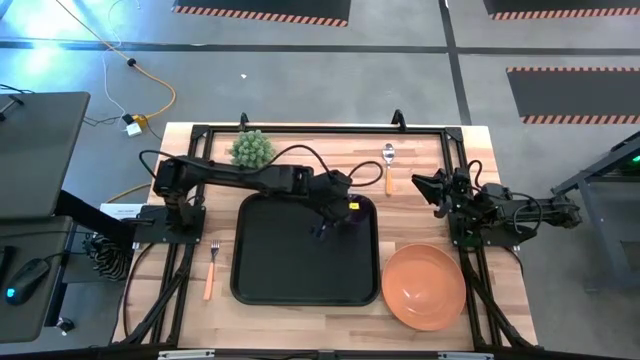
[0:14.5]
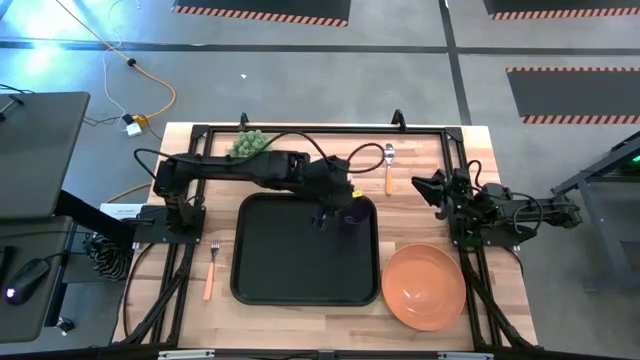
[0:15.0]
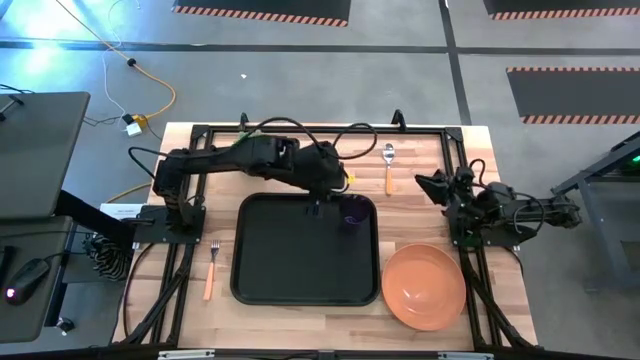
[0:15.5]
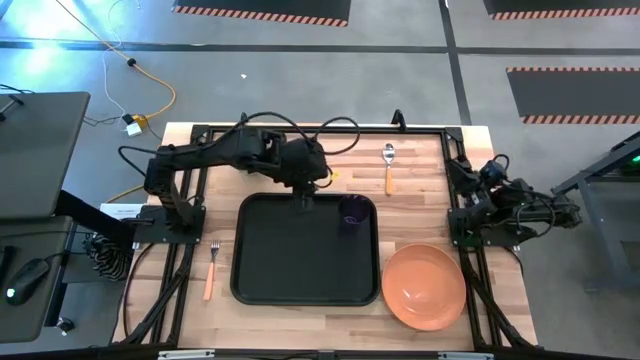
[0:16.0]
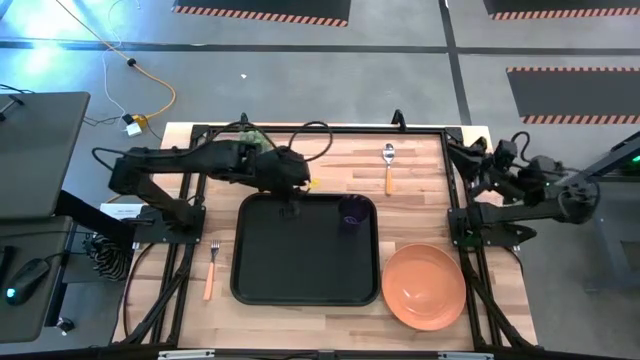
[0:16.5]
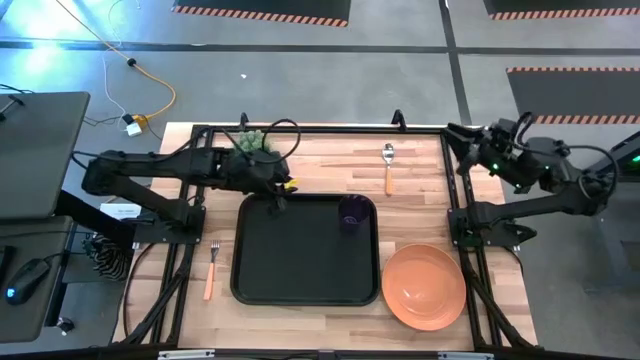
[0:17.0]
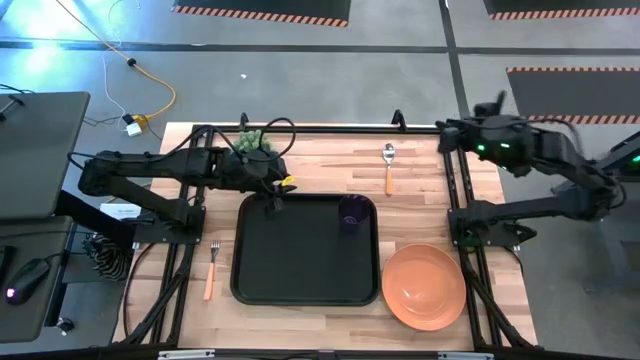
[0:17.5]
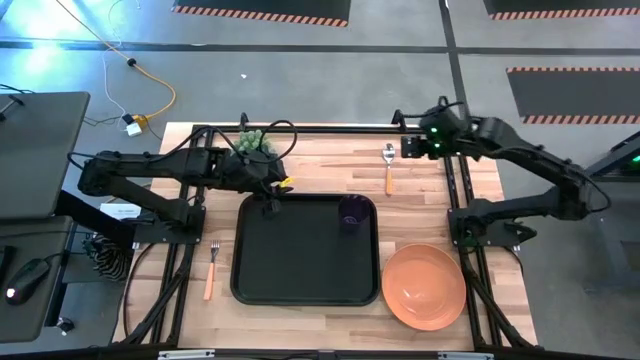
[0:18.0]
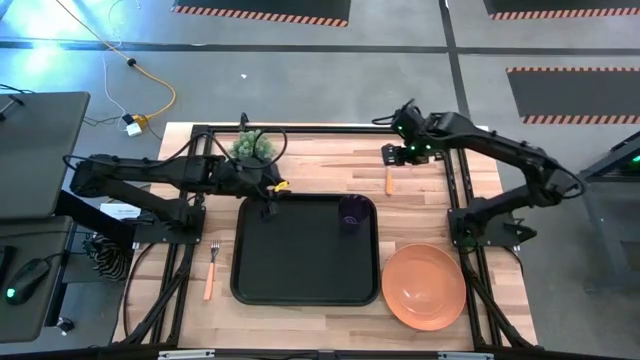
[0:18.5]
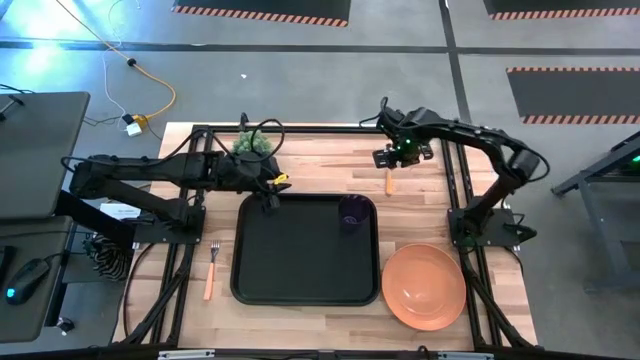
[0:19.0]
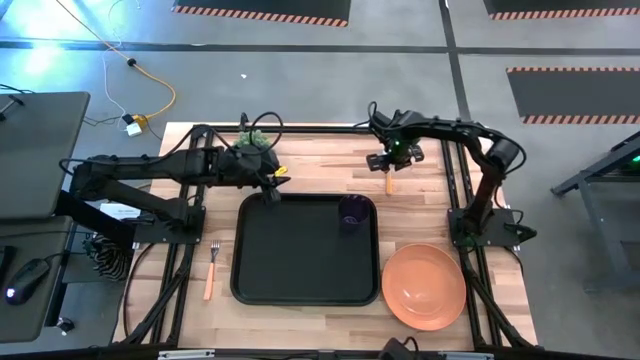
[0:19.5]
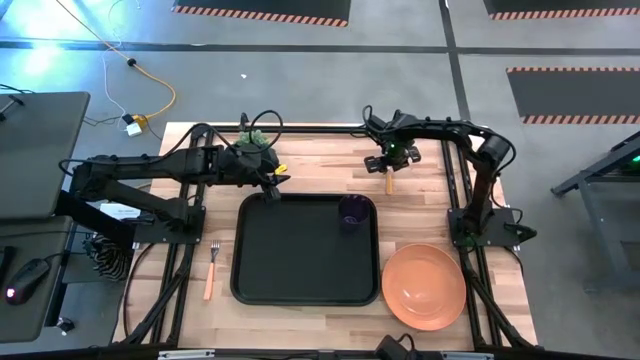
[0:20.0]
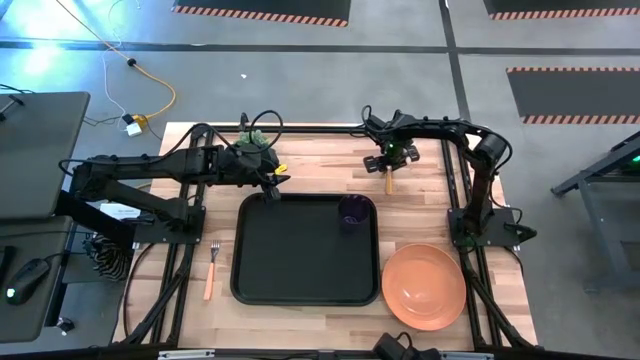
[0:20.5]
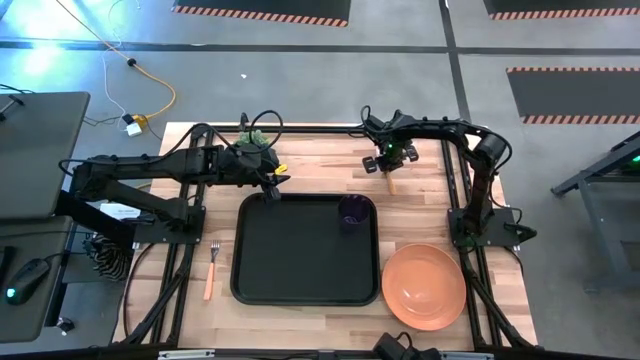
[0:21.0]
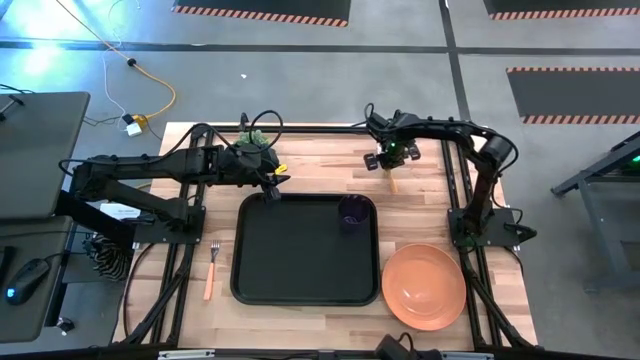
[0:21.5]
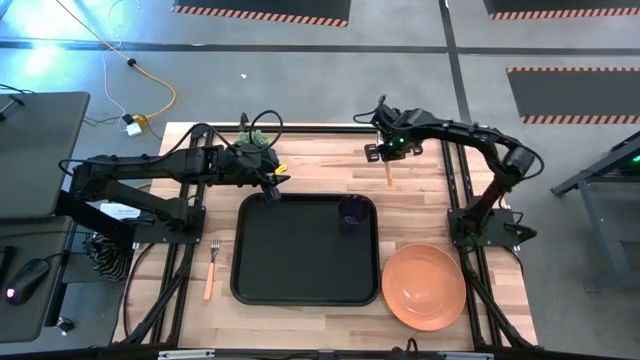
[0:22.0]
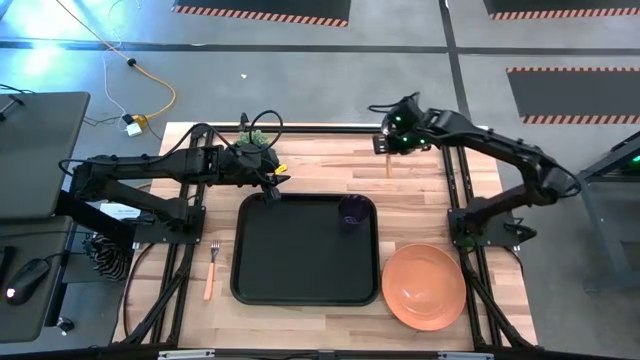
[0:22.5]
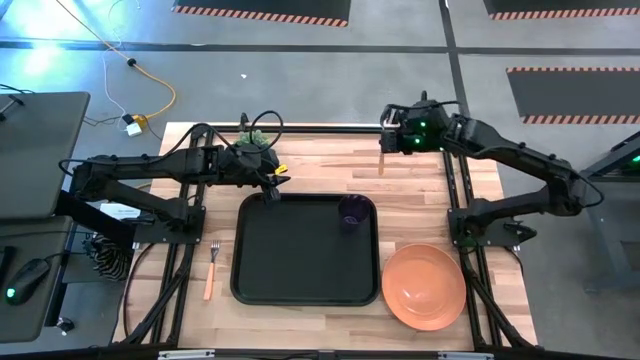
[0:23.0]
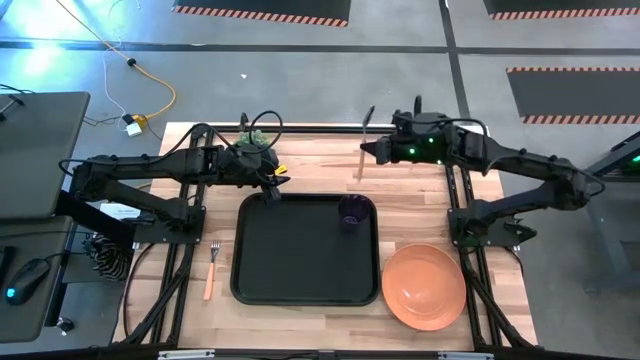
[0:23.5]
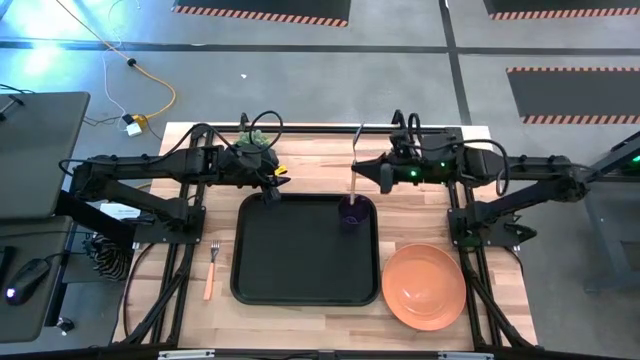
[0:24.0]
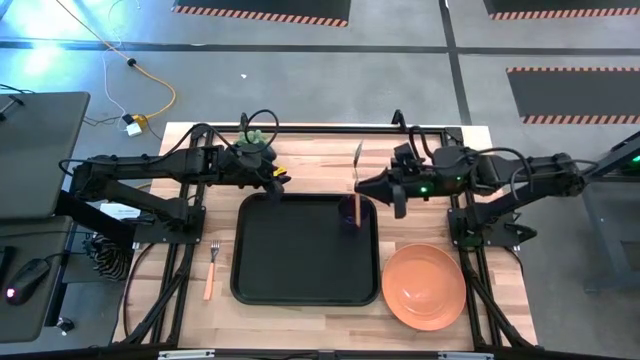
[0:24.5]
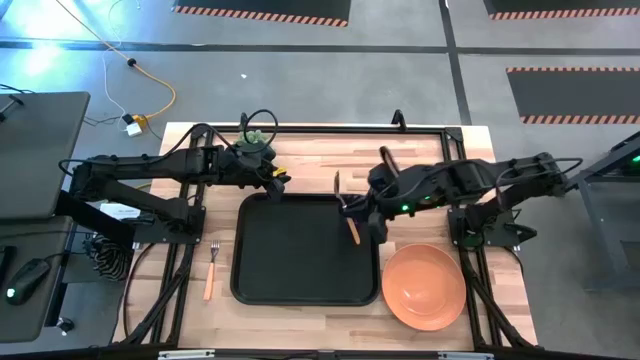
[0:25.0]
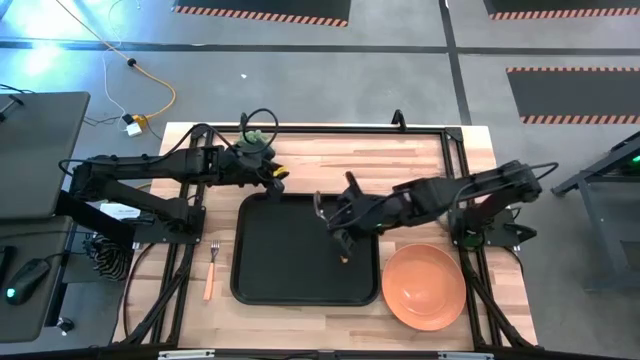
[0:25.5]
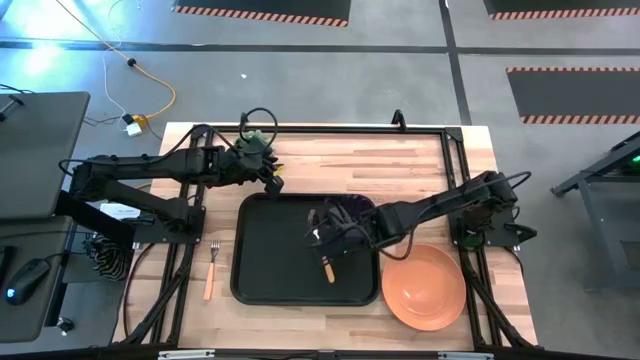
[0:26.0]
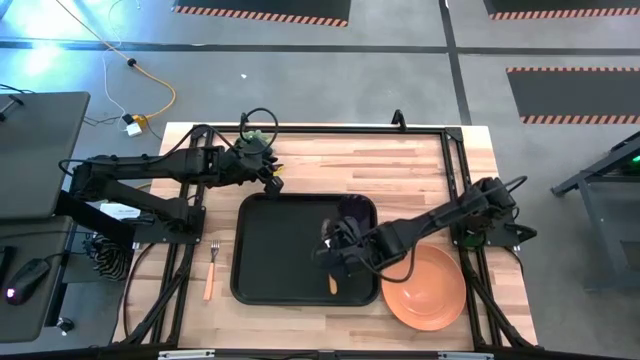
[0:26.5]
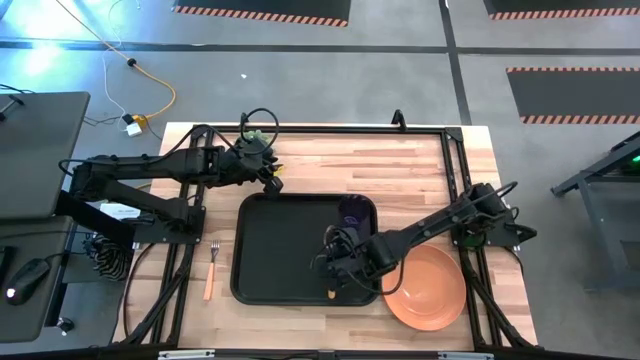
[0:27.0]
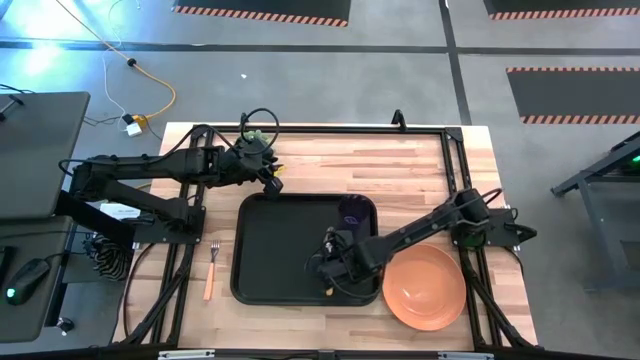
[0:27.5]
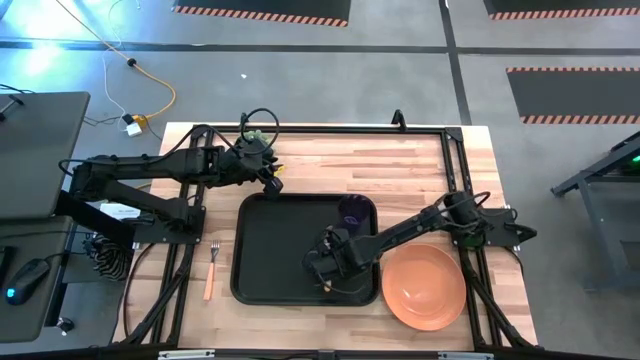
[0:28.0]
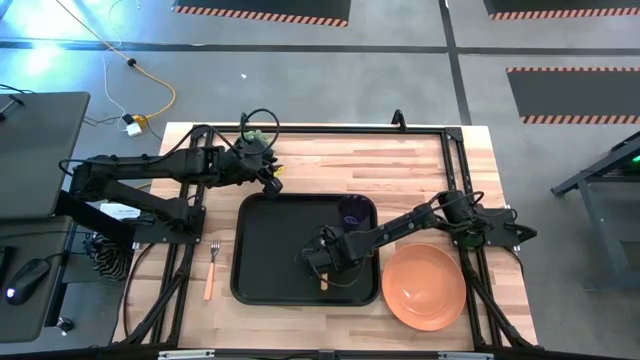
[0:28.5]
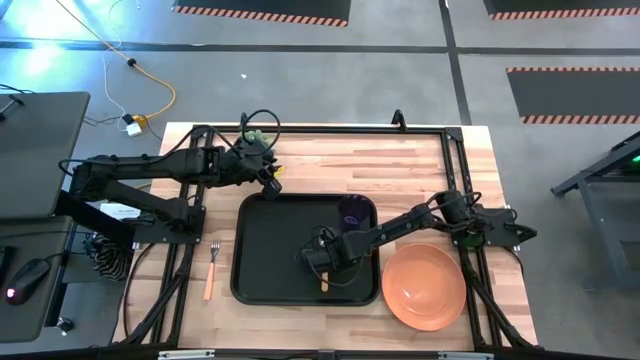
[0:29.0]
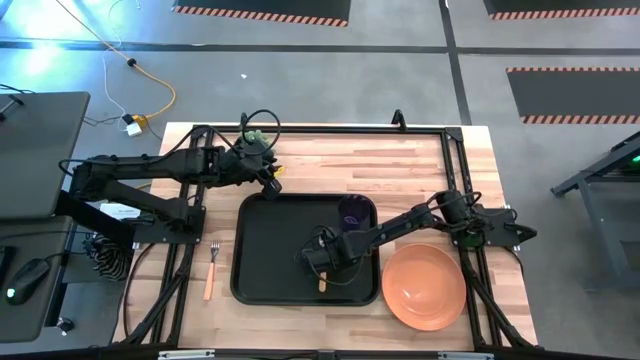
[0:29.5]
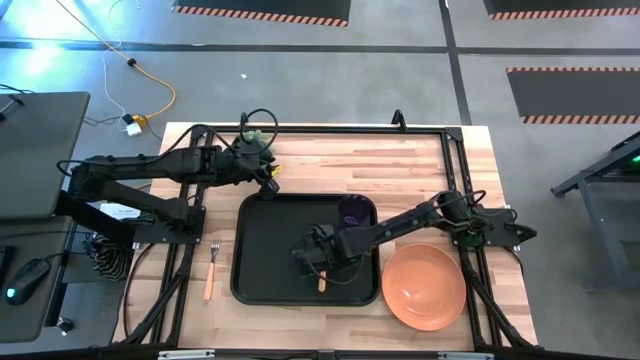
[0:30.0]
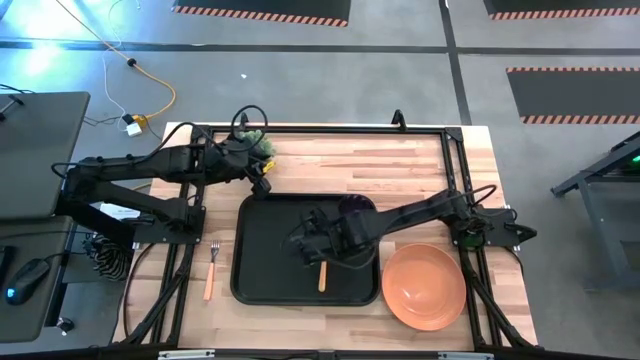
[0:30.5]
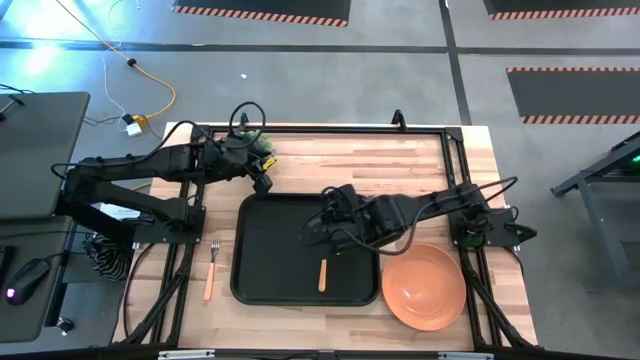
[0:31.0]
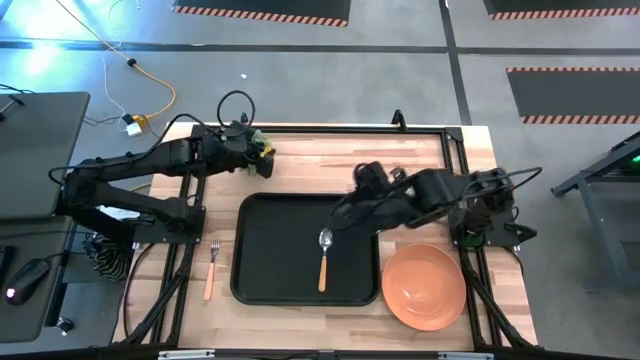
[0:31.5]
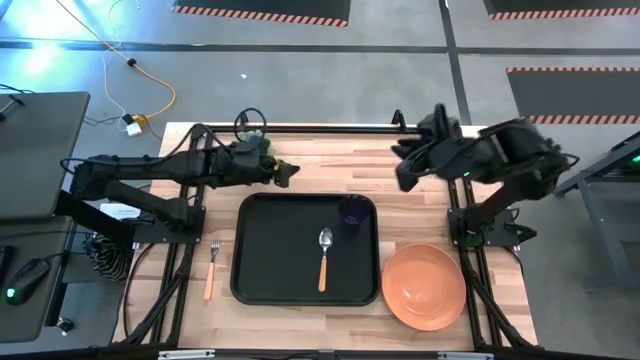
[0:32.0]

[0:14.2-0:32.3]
Task: Pick and place plate/cup/fork/spoon on tray
Put the orange yellow on the left side of the black tray

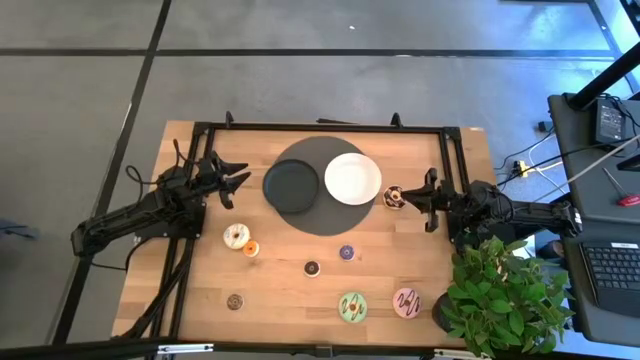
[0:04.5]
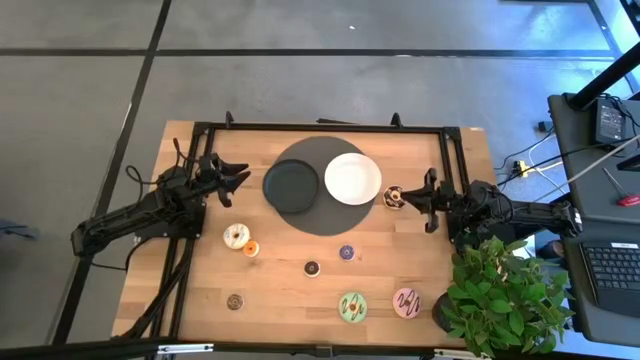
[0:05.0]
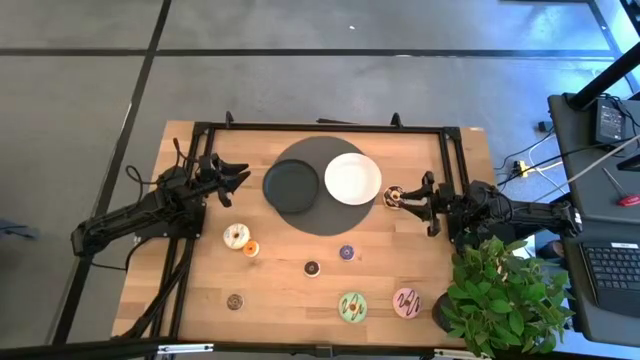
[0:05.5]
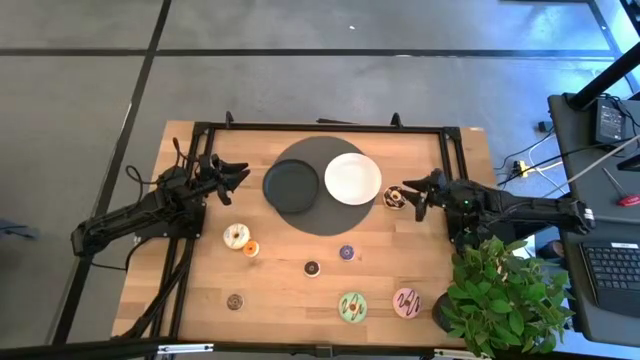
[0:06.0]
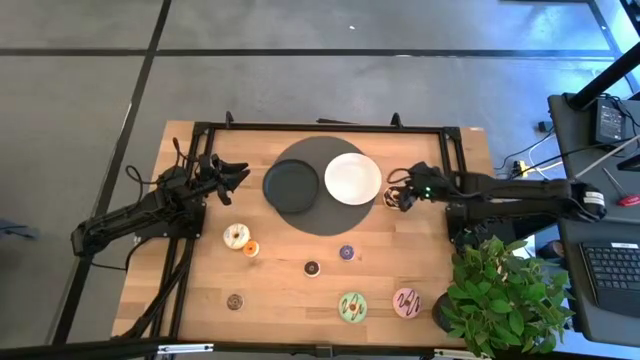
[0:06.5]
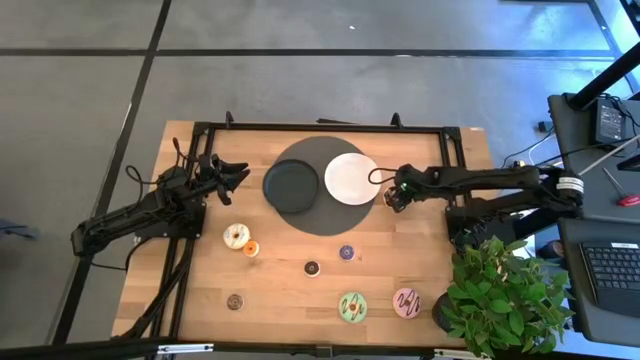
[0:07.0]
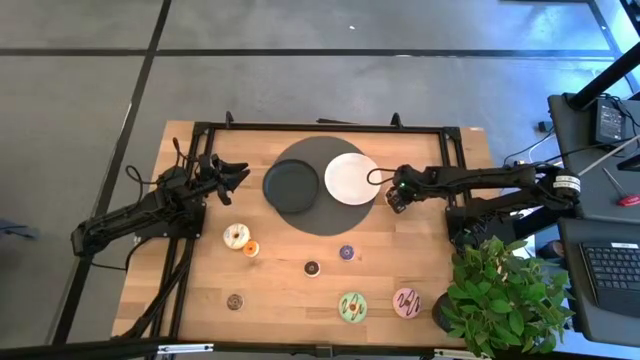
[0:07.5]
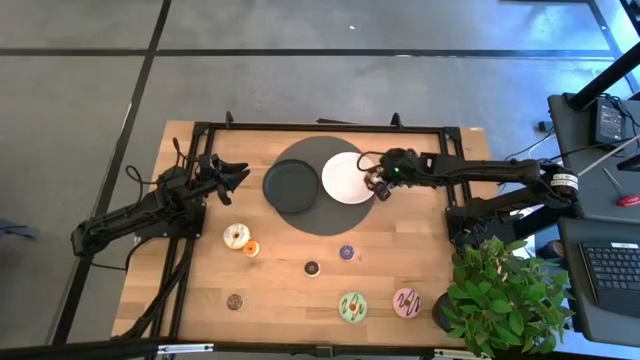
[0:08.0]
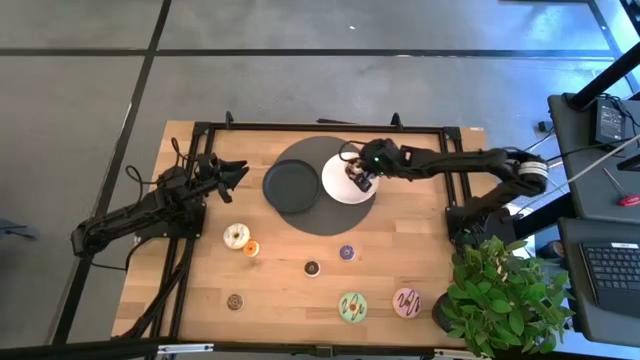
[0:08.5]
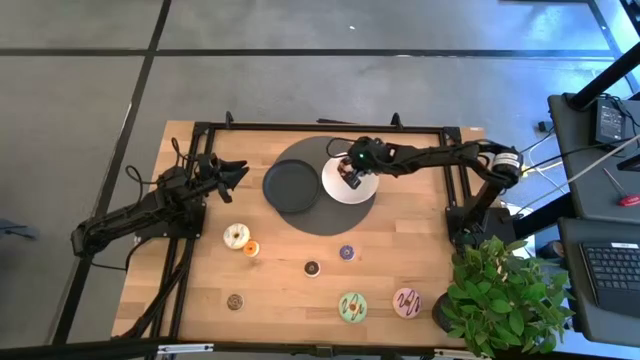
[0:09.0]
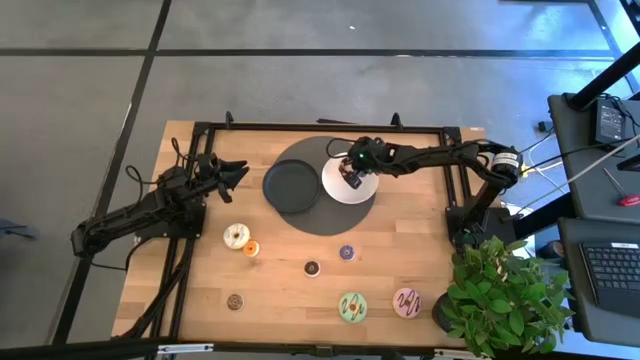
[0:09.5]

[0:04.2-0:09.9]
Task: Pick & Place donuts
Put the big black donut on the white plate
